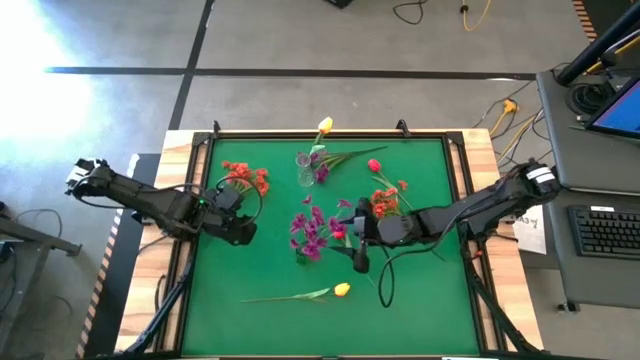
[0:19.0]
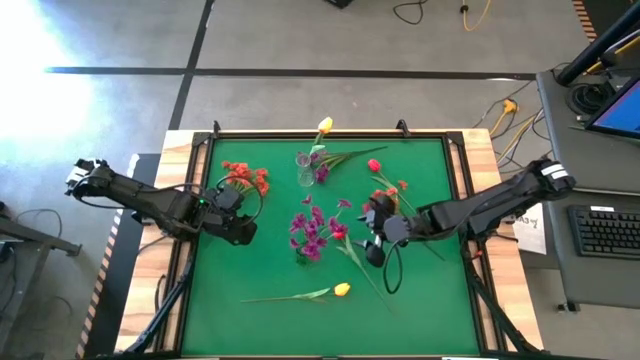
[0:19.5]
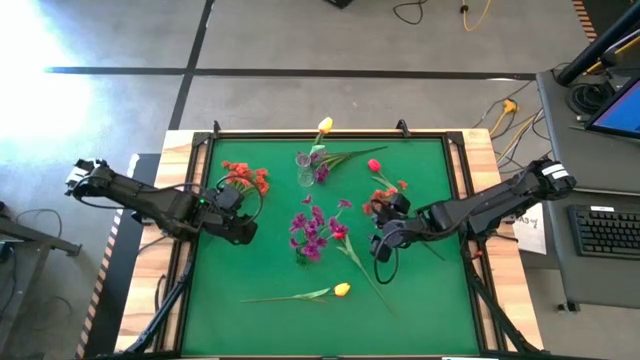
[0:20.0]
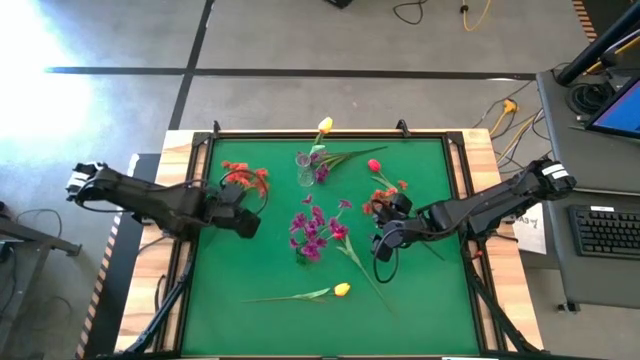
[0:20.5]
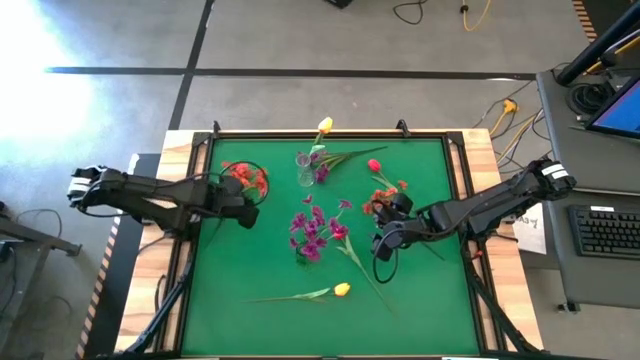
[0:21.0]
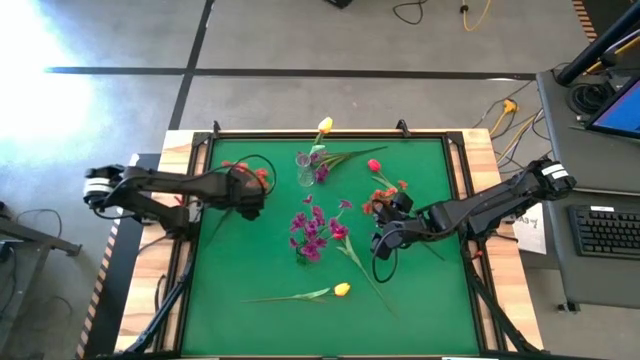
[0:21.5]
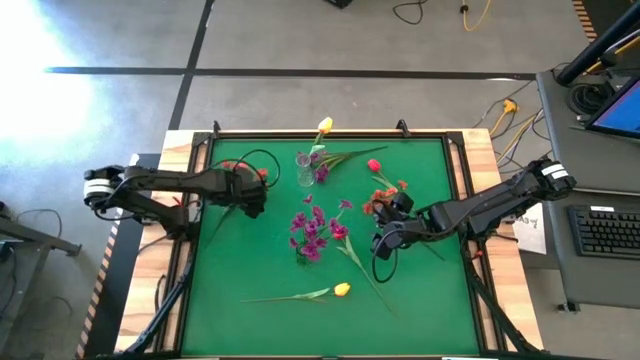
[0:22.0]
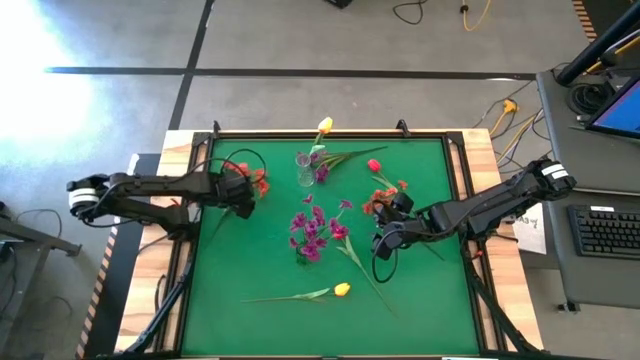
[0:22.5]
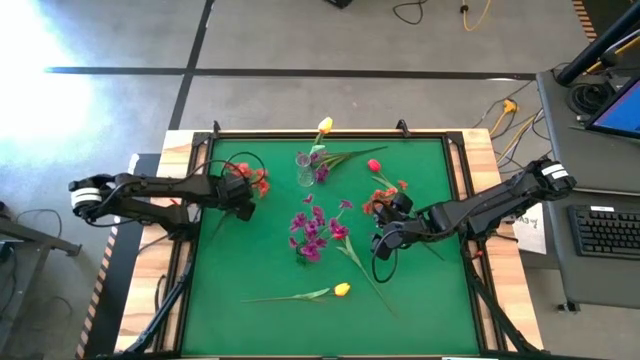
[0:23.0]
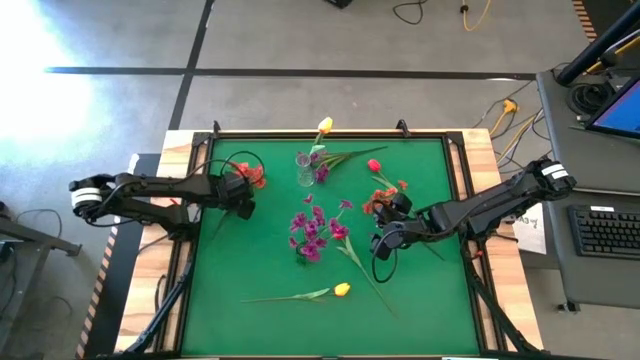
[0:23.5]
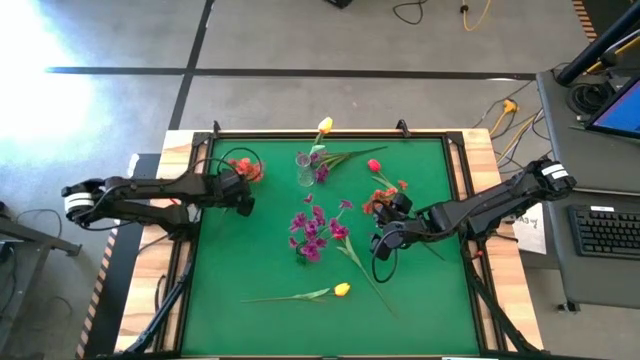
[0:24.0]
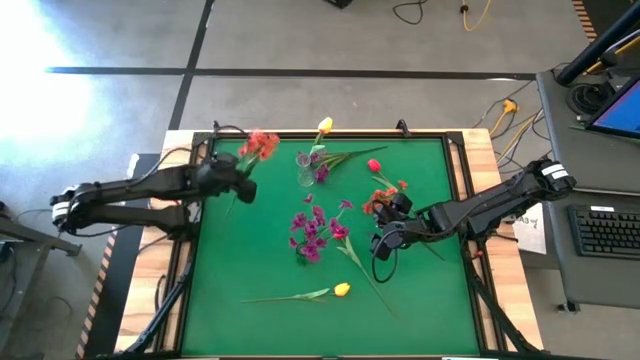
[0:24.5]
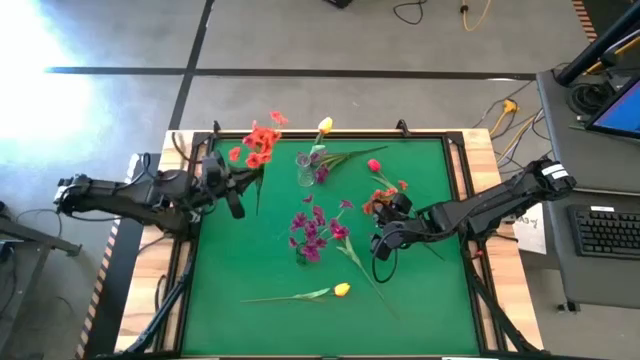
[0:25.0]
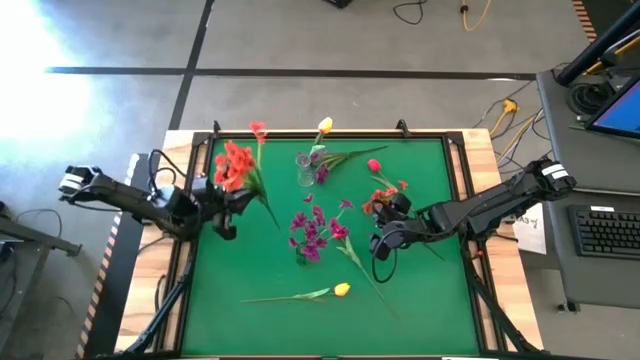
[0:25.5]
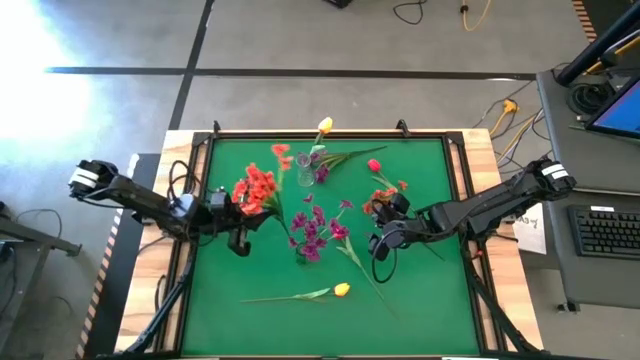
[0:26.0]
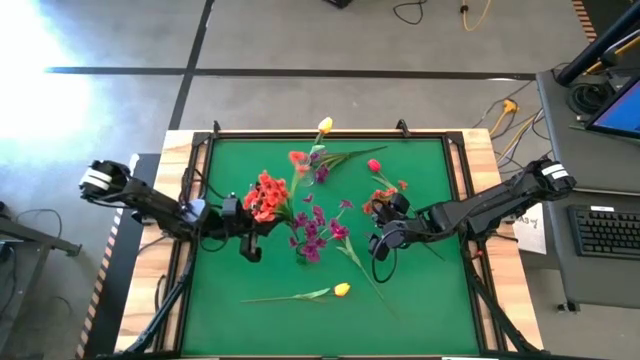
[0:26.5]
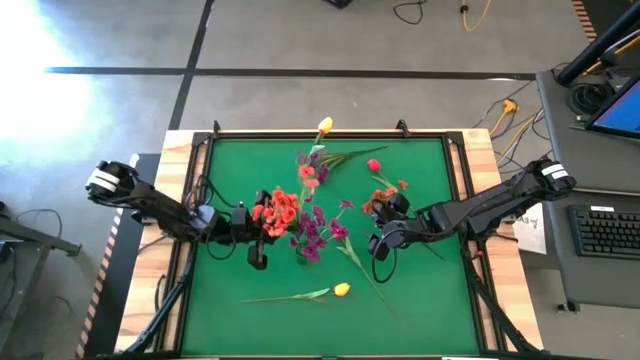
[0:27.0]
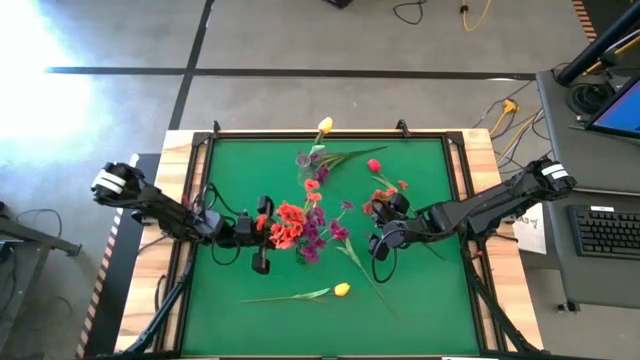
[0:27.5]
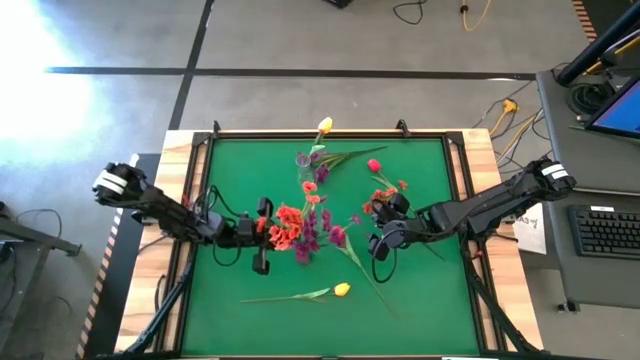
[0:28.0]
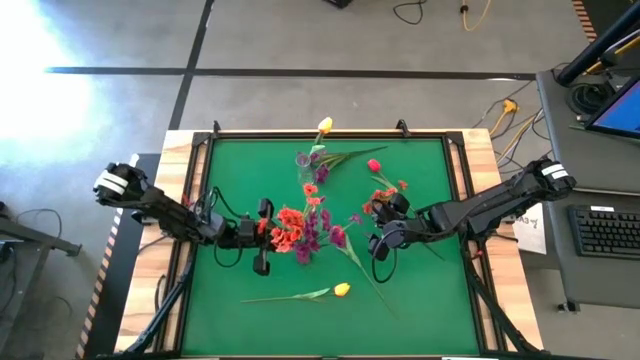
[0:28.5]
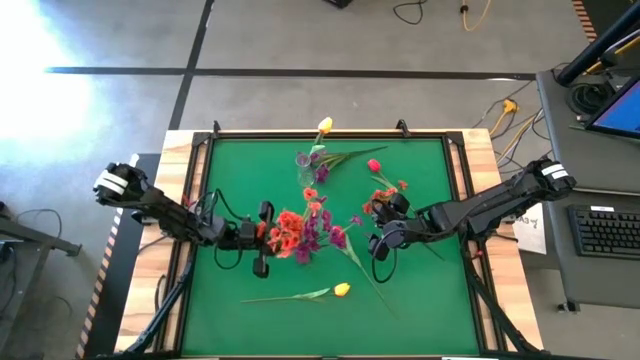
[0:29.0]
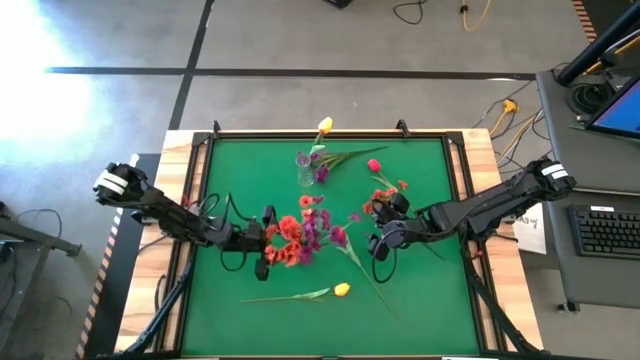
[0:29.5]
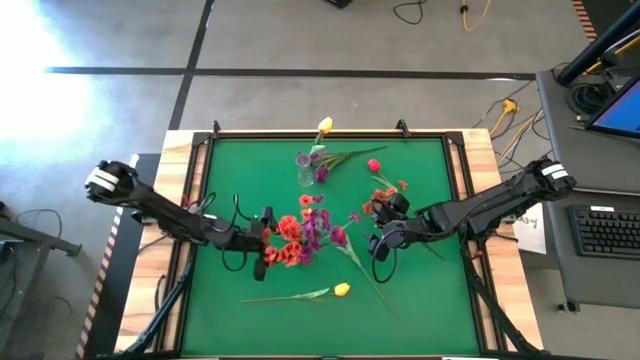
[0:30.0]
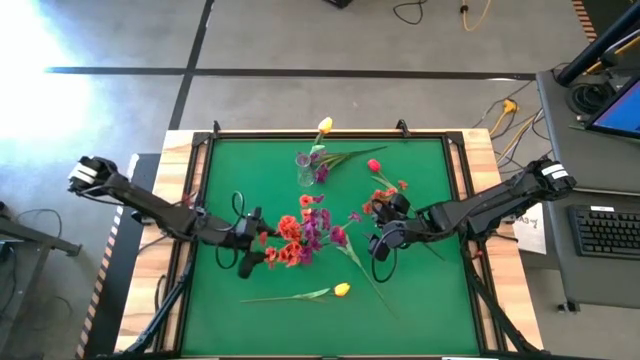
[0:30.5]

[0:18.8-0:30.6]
Task: Sort flowers into vase by color
Put the left orange flowers into the green vase

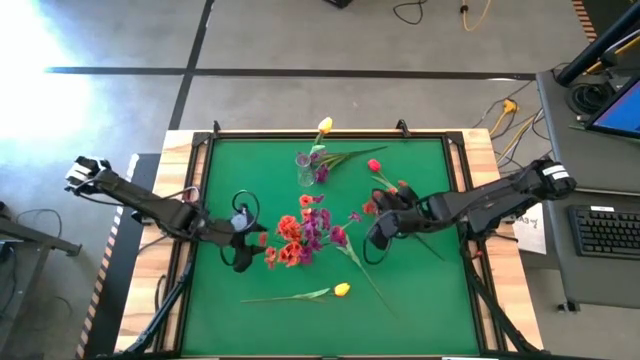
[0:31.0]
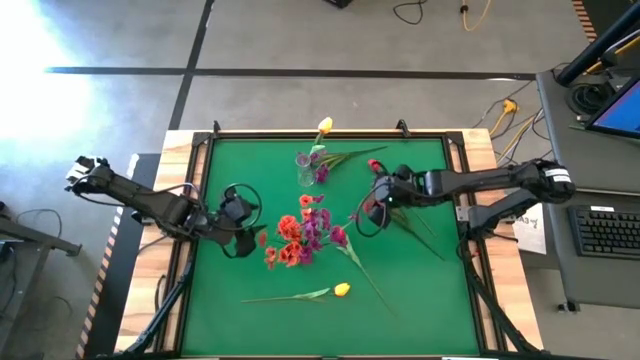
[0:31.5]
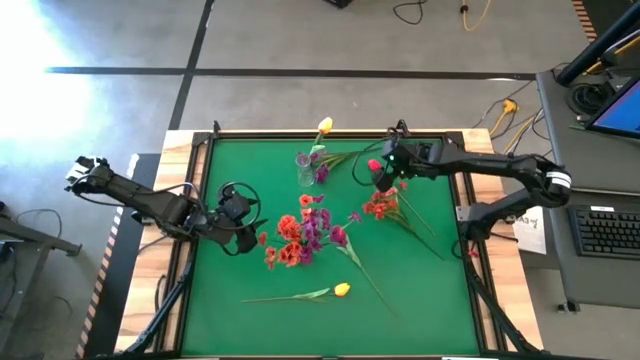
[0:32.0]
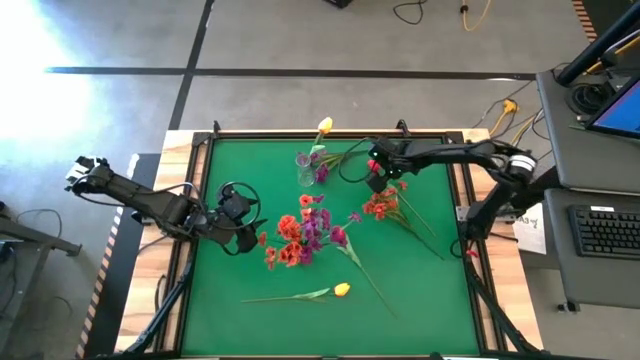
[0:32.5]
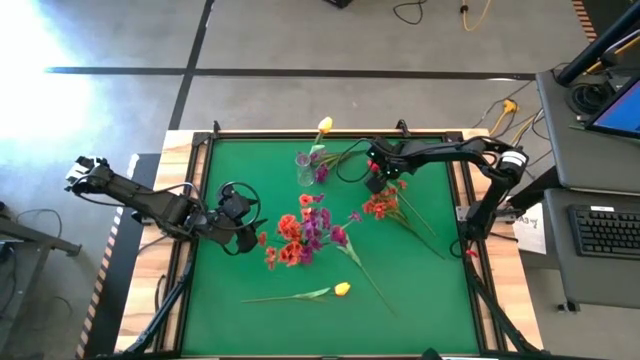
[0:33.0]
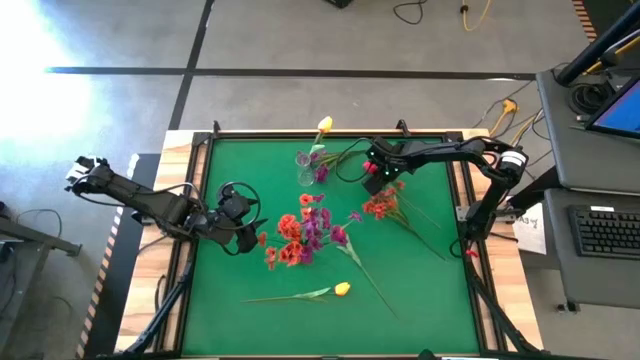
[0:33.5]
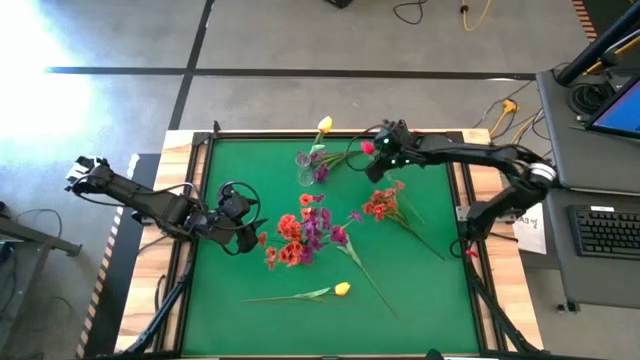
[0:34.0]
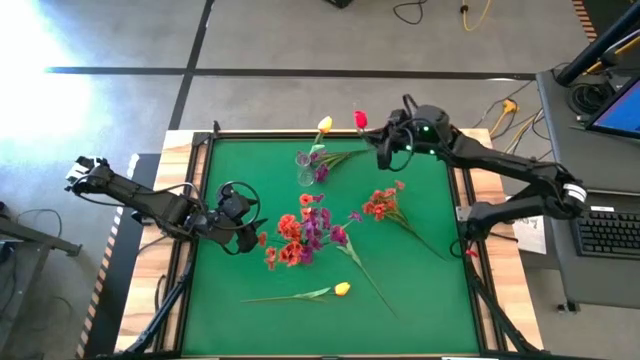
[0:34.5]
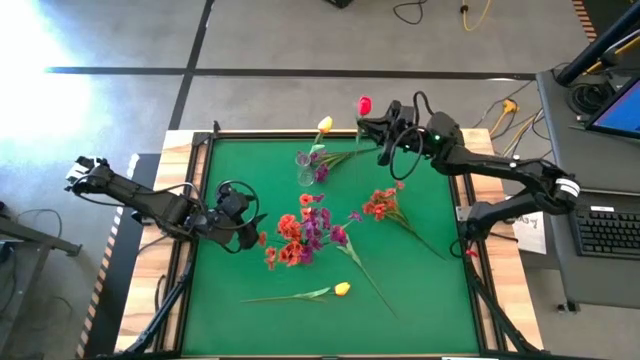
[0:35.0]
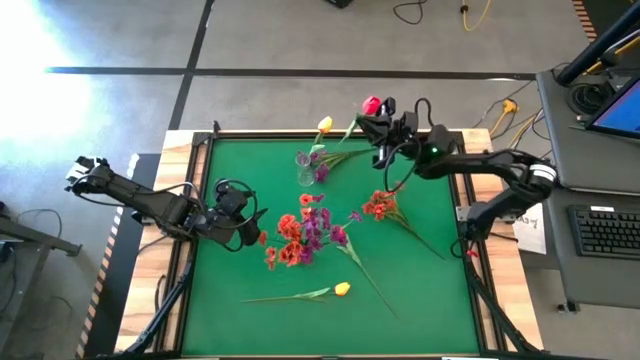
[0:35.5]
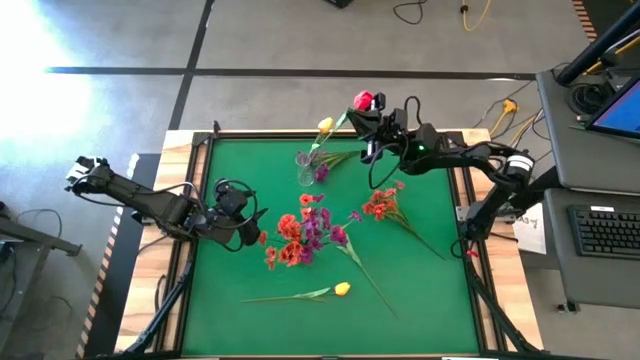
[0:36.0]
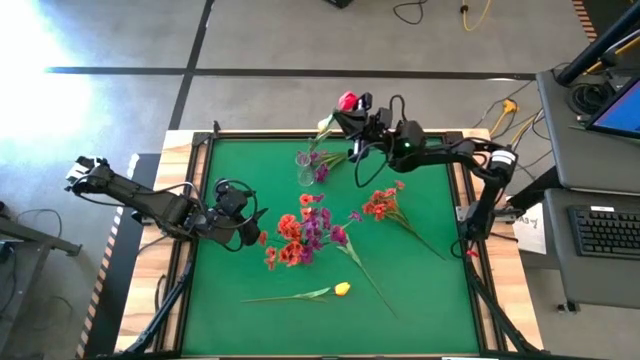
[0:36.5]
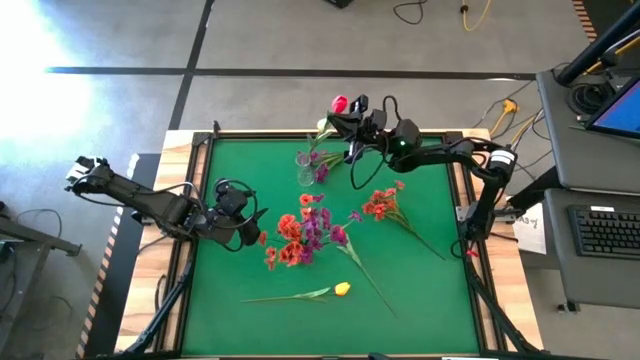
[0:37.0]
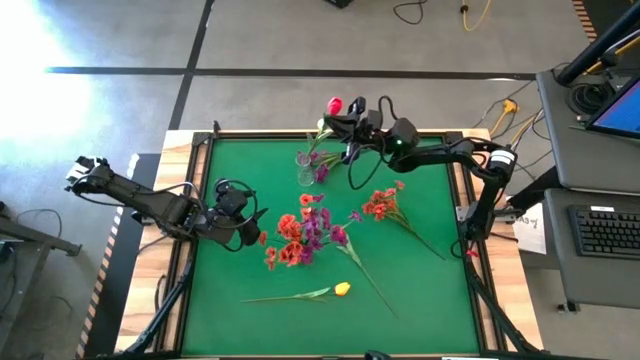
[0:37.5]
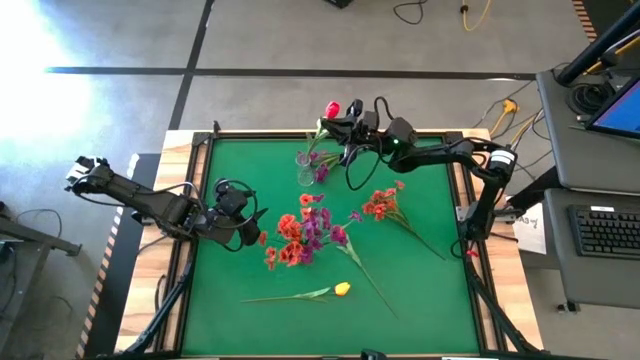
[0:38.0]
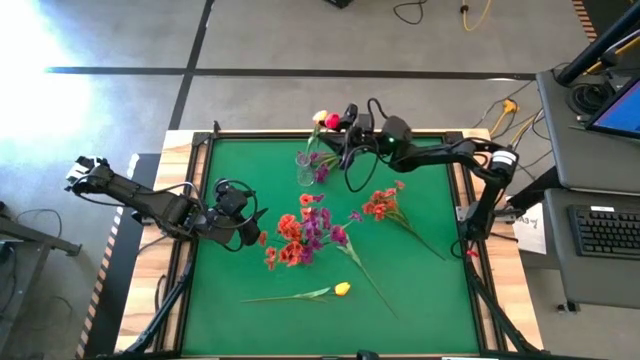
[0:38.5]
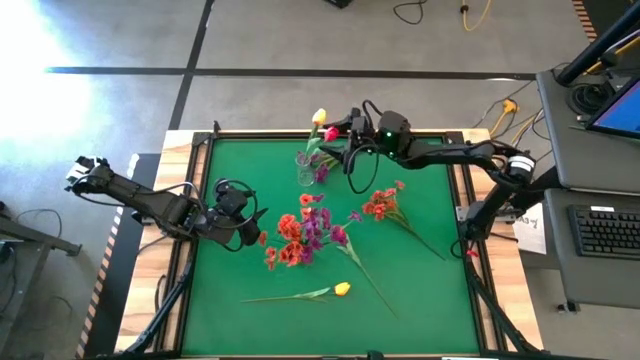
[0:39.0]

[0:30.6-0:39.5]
Put the top red tulip into the transparent vase

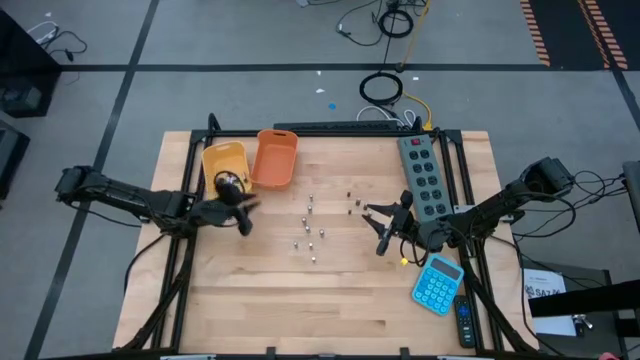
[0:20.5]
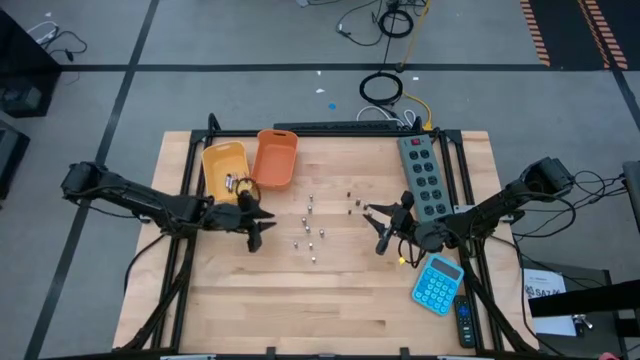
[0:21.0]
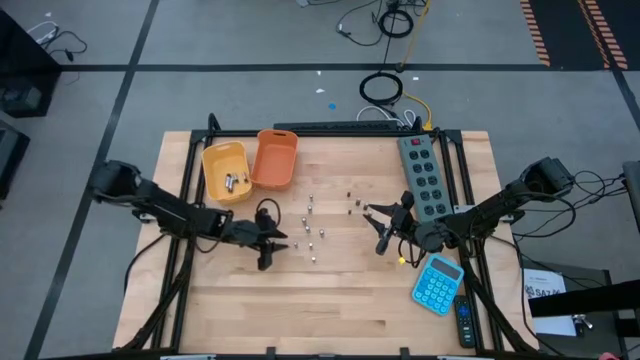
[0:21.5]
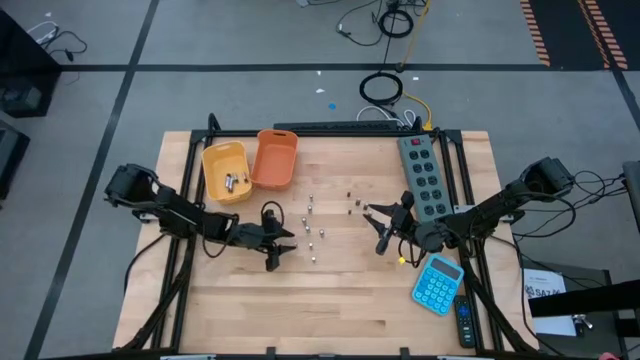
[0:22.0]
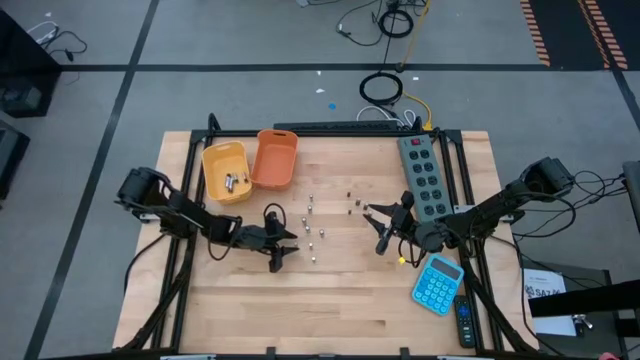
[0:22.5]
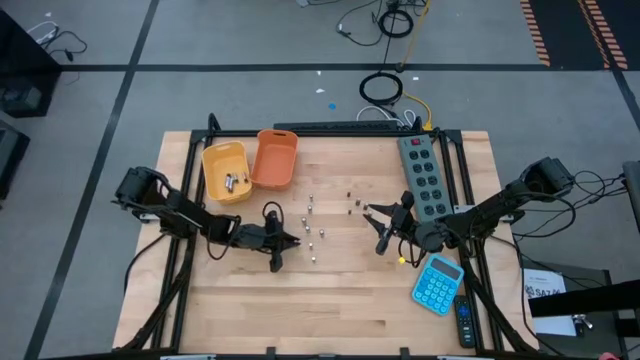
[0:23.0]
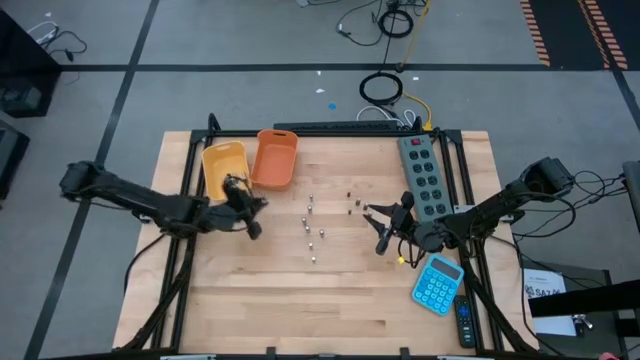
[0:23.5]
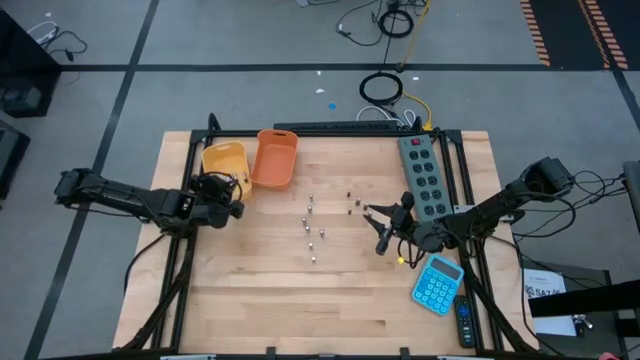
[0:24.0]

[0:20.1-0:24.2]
Task: Sort batteries
Put the silver battery into the yellow bin
